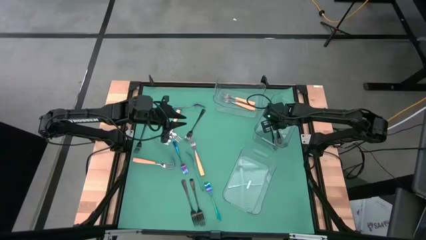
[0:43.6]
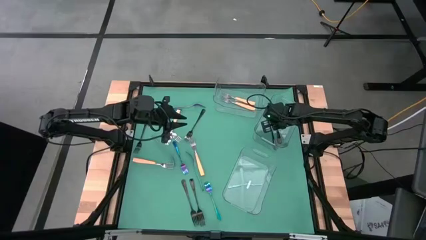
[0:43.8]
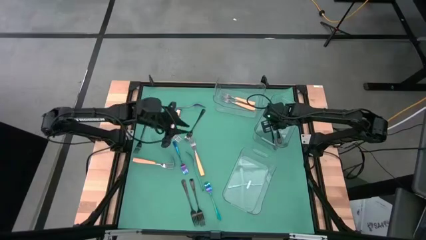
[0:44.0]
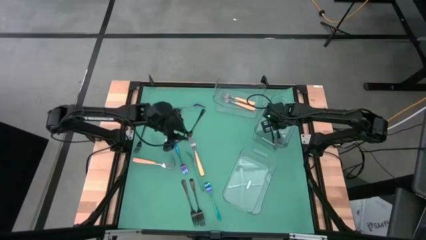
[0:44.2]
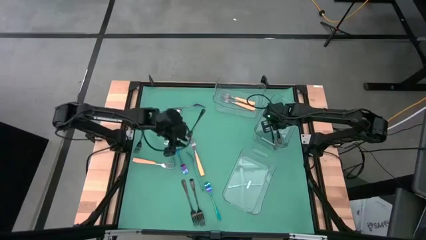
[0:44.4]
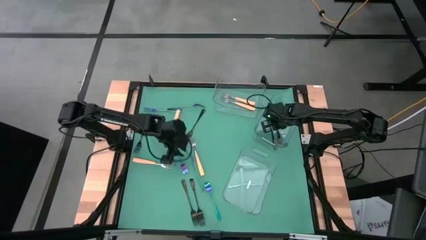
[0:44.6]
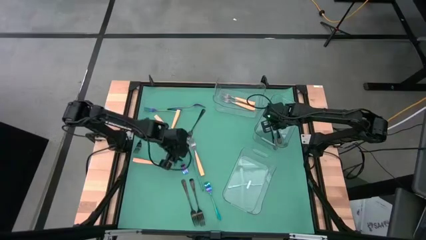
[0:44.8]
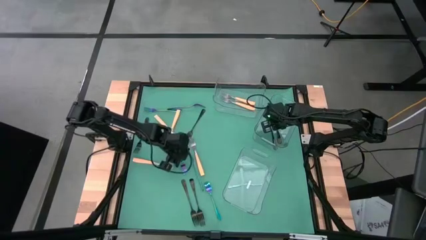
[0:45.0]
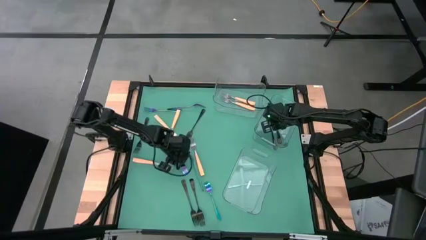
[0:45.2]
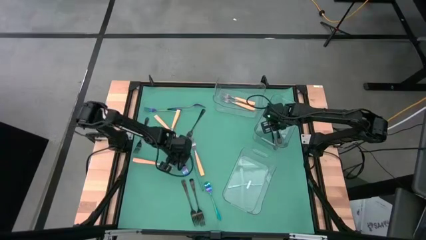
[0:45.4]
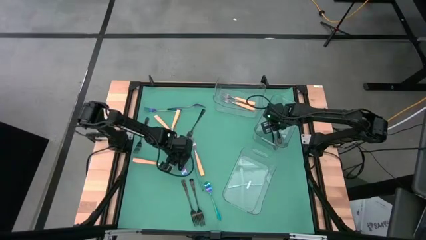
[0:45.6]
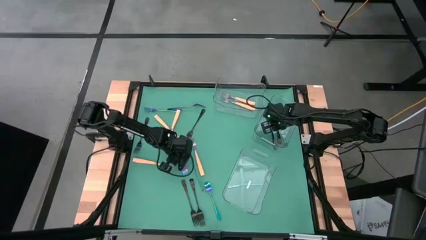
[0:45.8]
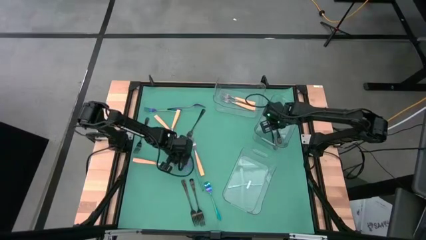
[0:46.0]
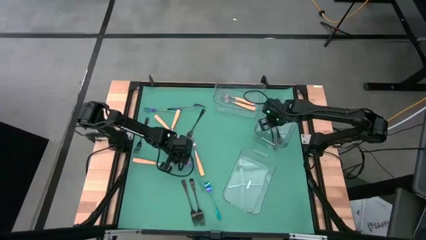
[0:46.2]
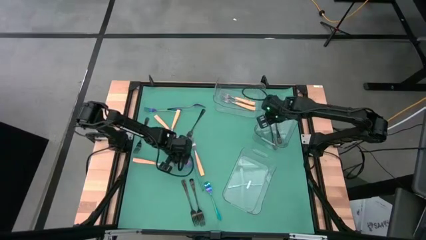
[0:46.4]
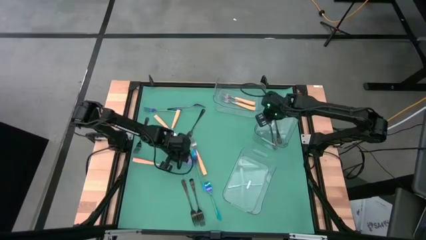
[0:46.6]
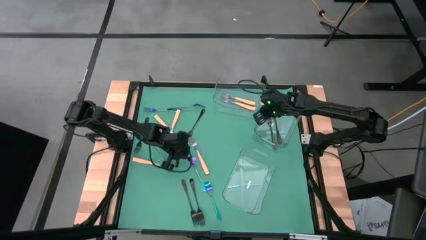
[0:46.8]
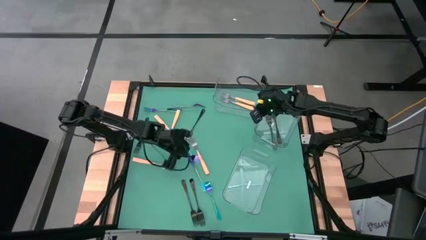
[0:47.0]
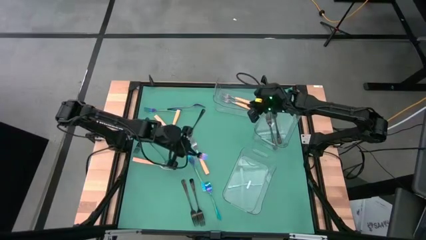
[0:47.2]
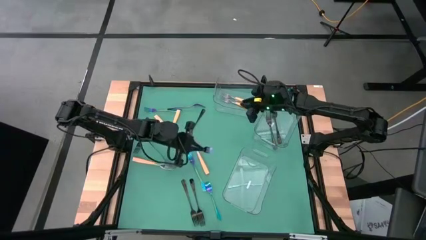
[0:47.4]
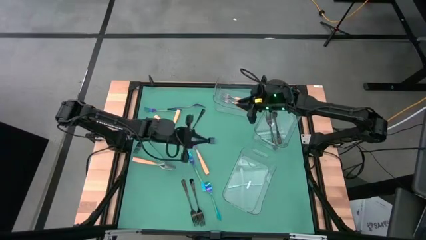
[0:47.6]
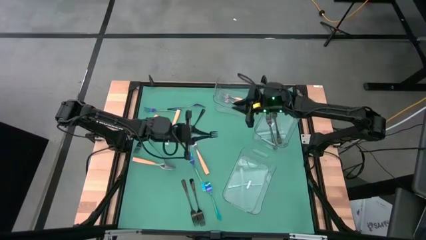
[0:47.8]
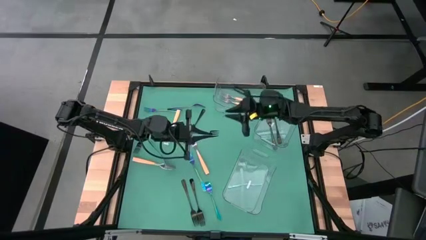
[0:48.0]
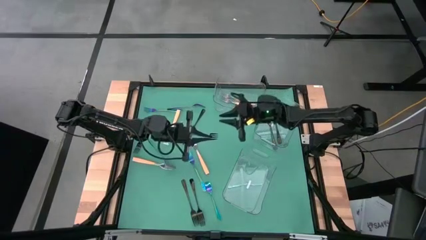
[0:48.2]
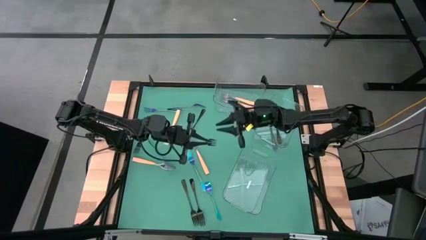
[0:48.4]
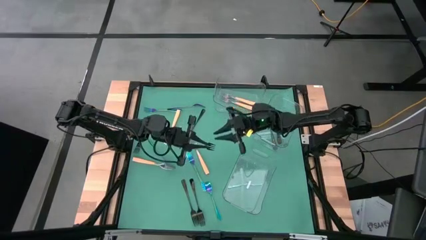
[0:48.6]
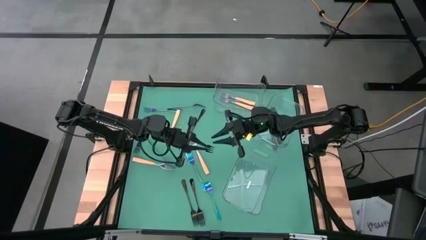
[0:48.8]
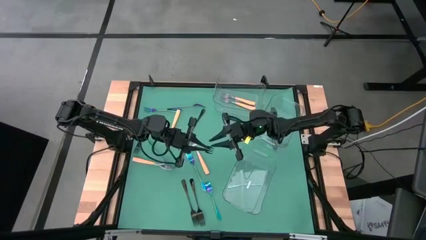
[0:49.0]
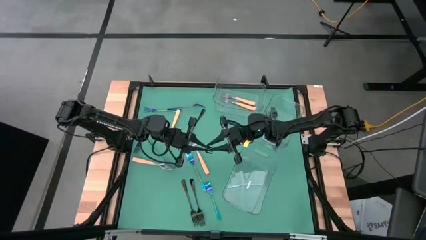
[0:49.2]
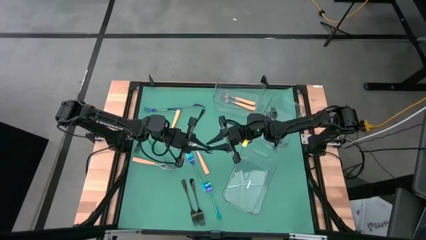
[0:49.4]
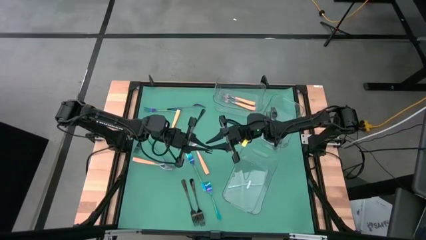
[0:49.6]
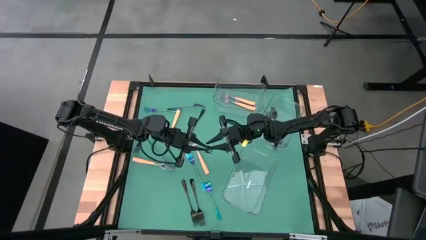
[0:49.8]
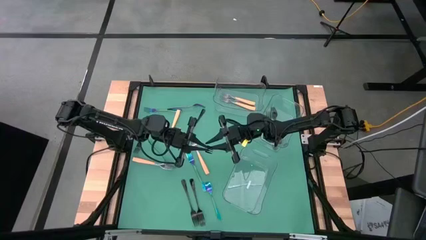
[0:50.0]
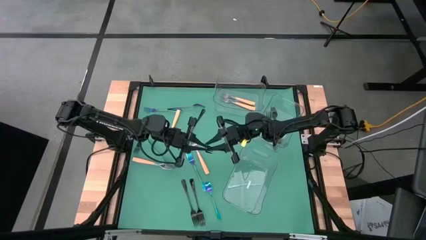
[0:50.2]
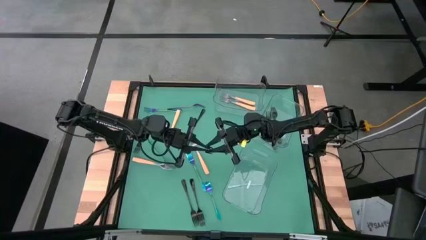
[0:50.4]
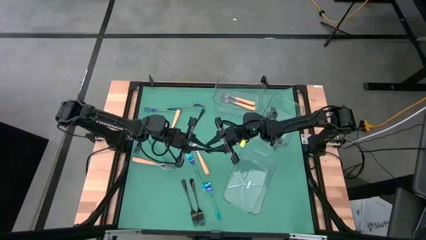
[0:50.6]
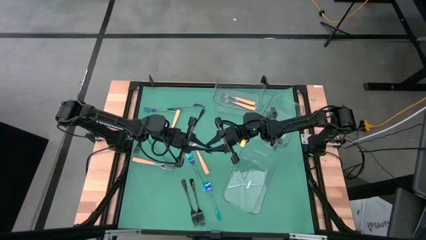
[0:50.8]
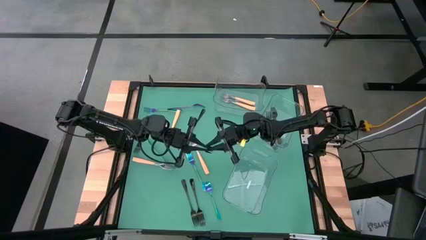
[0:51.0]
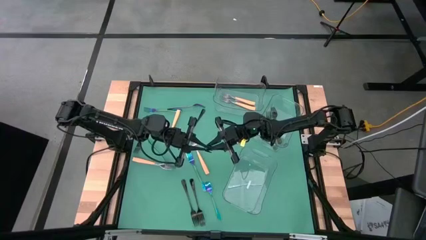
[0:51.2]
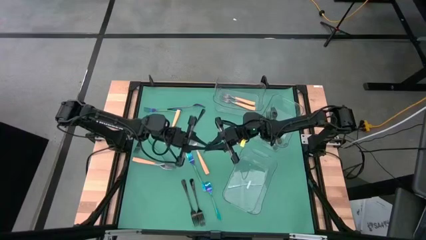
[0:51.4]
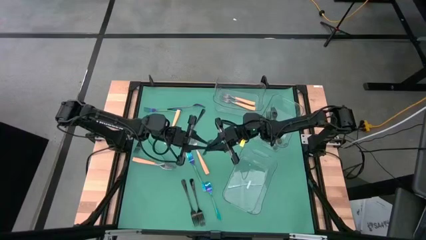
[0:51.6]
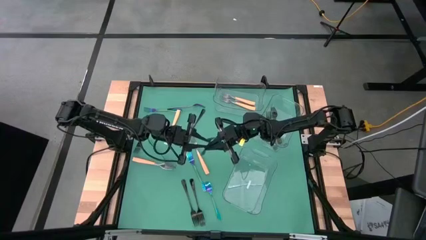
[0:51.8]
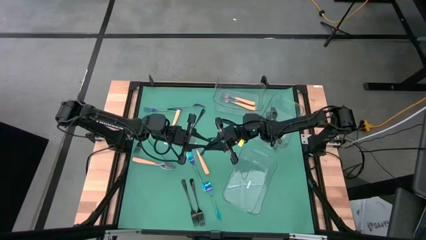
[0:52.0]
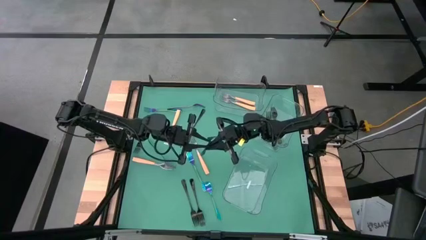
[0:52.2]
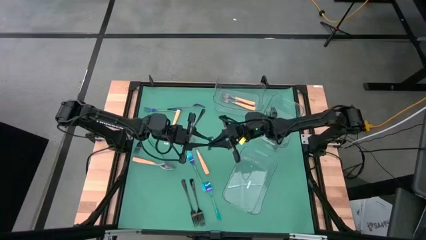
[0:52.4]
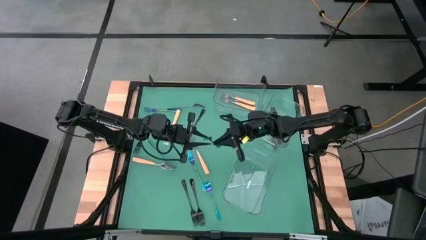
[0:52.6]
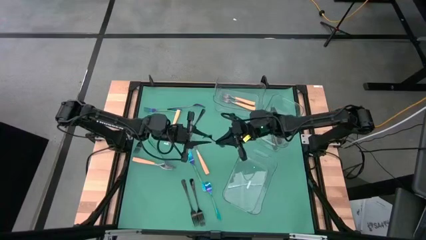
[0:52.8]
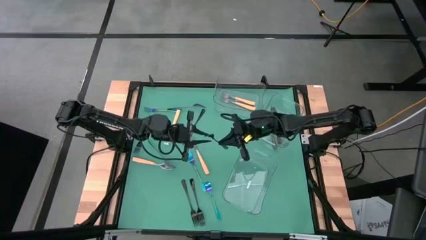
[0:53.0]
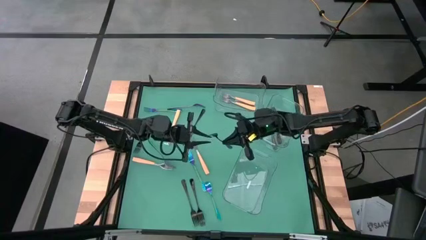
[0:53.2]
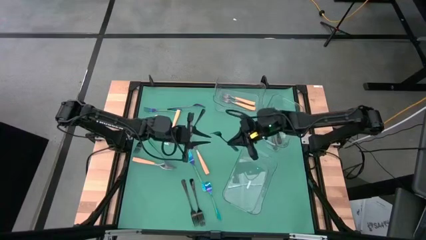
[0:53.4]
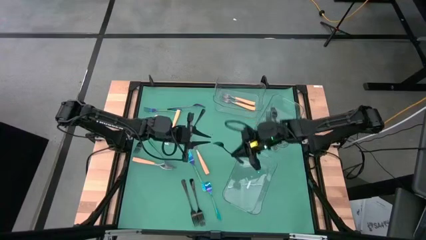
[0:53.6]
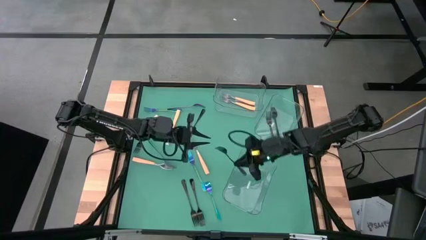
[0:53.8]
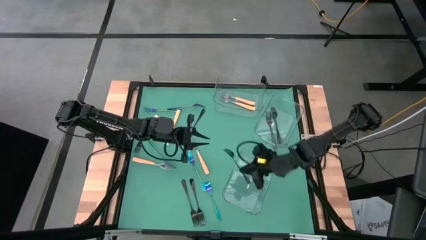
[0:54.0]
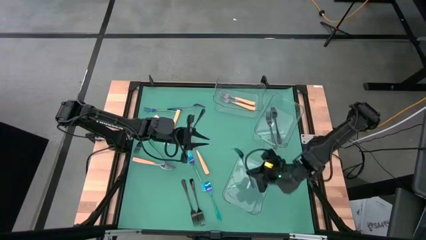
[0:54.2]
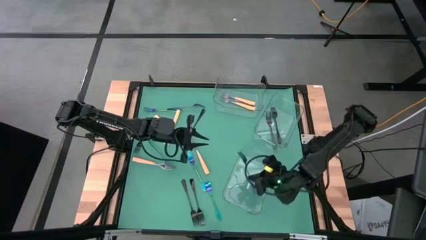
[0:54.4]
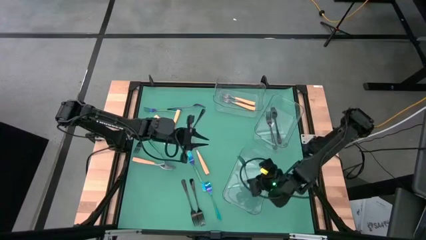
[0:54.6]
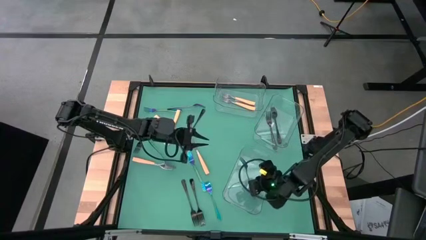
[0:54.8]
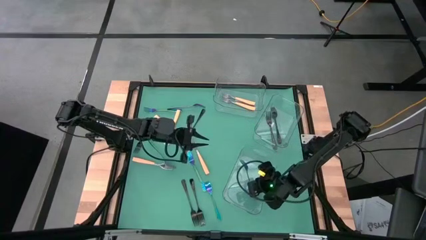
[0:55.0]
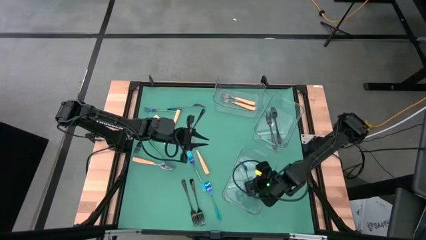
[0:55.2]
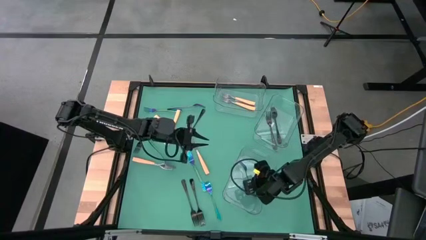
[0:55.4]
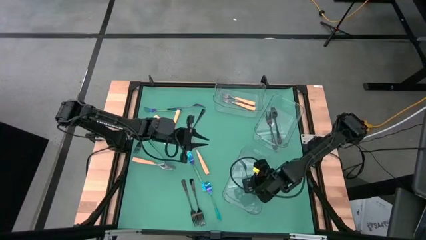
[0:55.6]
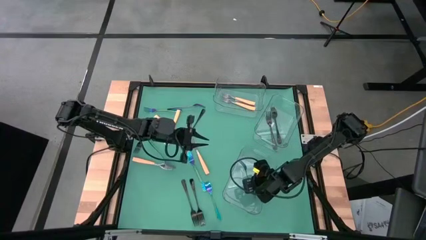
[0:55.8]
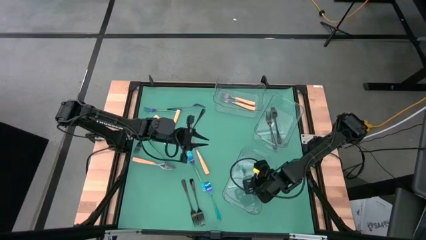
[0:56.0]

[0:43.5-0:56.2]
Task: Sort silverware by color (type)
Put the blue fork into the bottom transparent bin

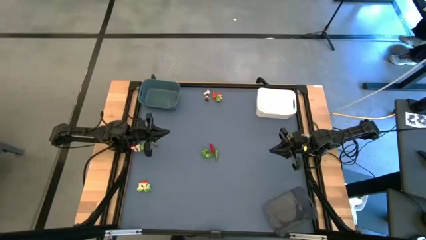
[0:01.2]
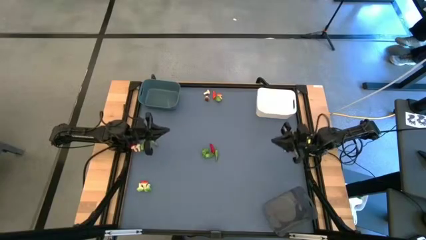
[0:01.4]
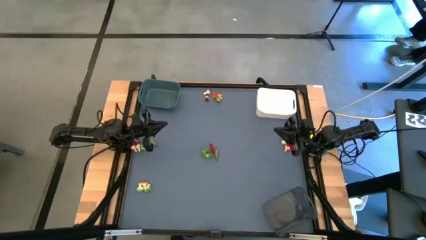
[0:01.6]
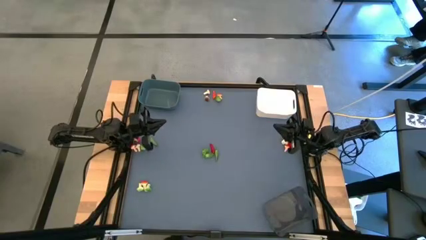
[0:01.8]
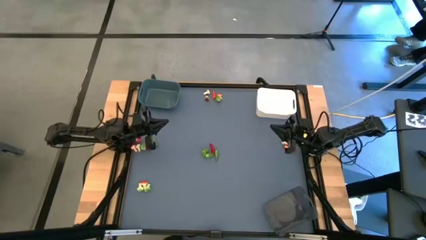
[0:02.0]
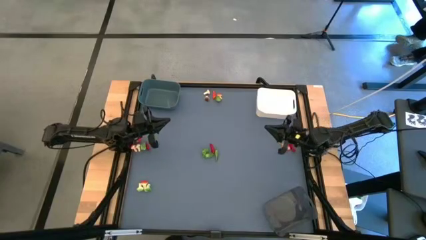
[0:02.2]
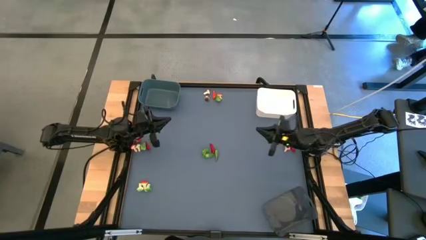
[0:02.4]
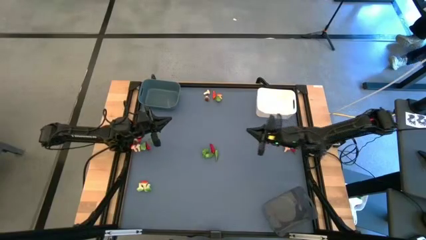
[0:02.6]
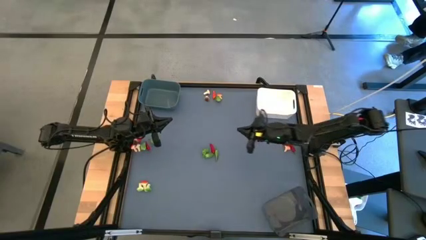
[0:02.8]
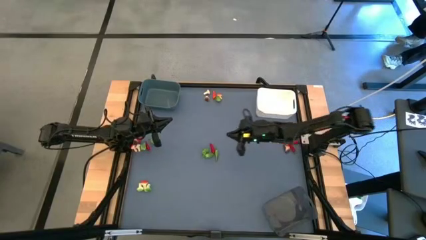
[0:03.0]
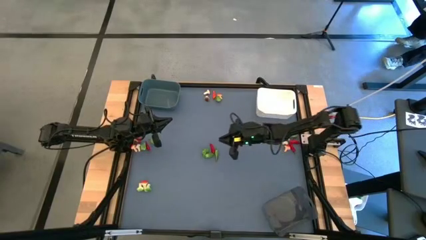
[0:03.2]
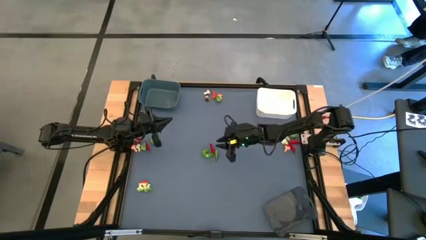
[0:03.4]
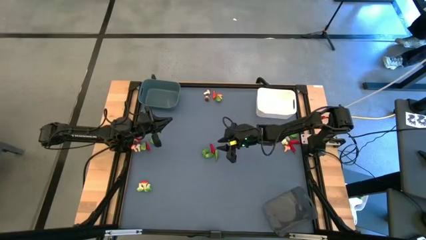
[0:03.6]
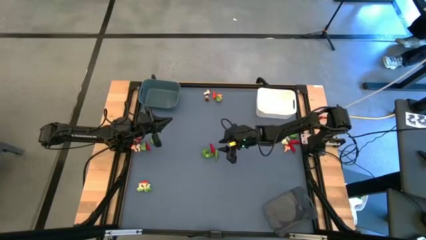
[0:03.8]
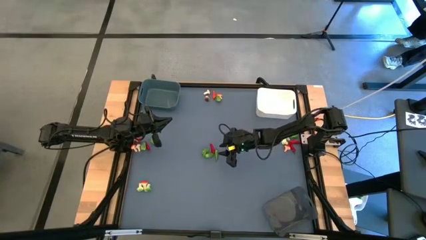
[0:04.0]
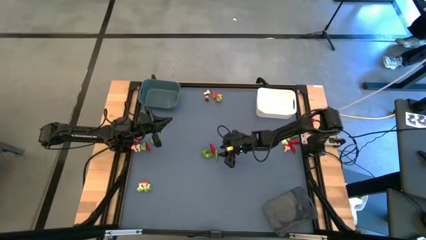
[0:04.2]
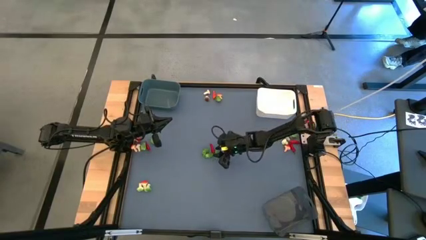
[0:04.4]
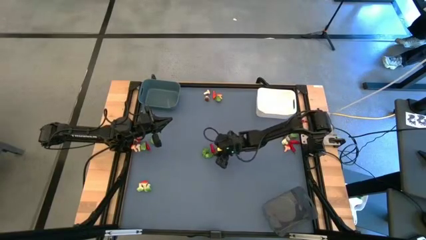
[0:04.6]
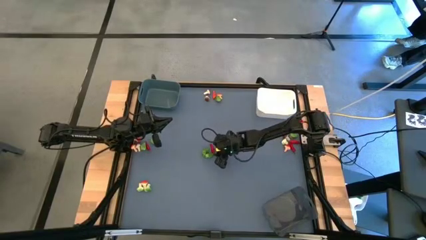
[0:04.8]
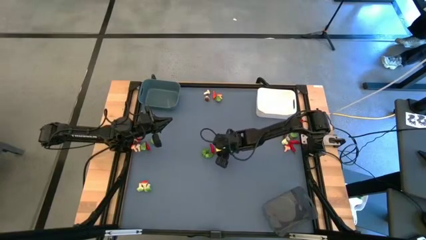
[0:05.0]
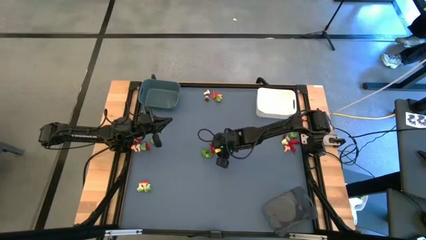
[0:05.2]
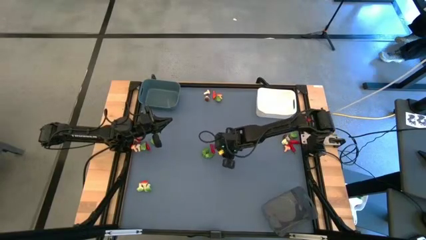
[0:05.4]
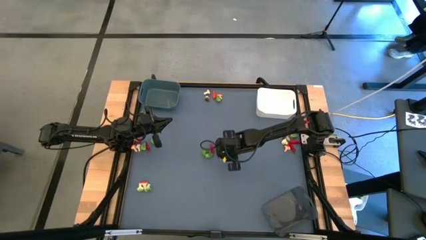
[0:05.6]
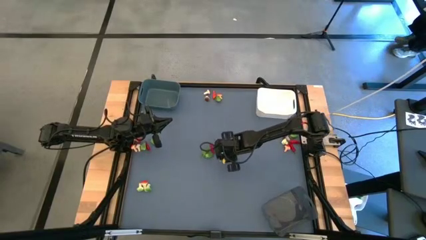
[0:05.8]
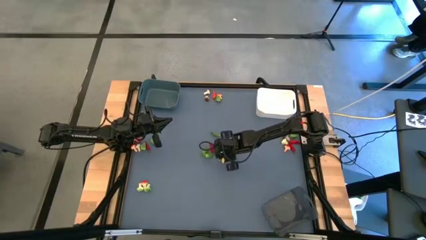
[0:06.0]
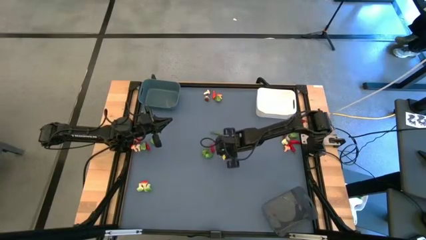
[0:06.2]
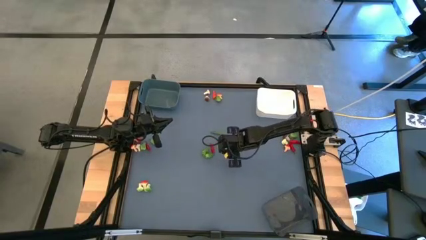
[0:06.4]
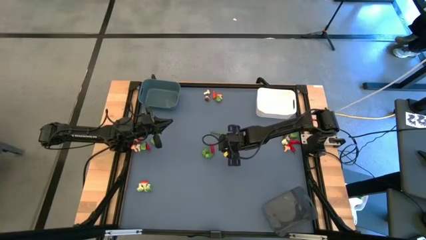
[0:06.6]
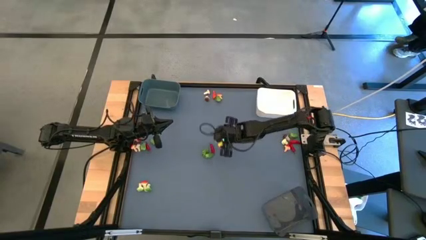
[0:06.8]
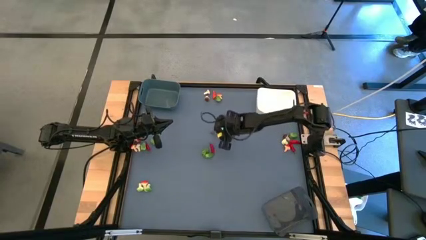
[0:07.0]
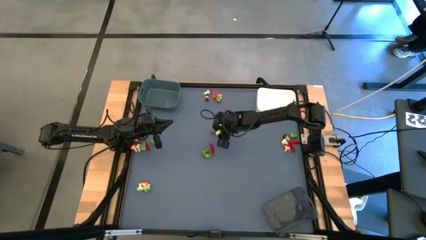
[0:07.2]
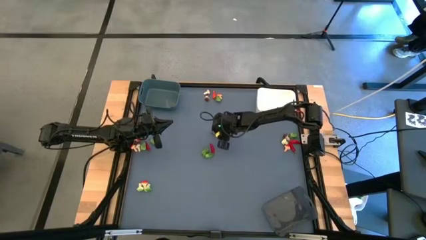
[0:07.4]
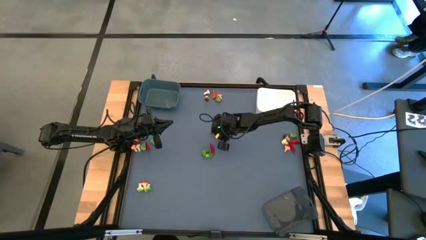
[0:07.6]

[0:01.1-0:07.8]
Task: Sort produce into baskets
Put the green chili pepper into the white bin
